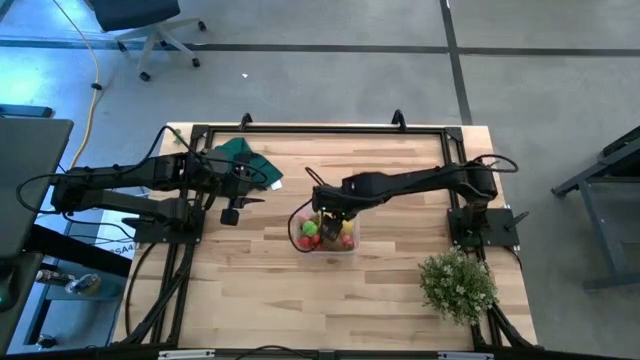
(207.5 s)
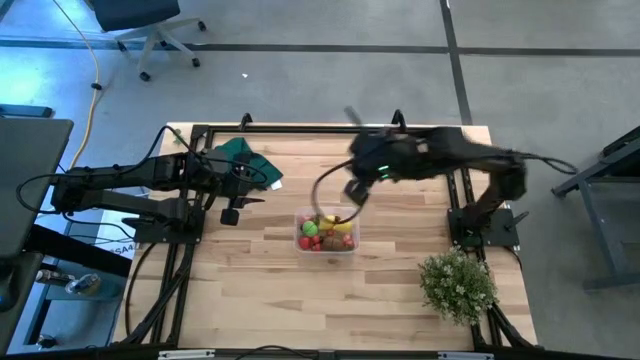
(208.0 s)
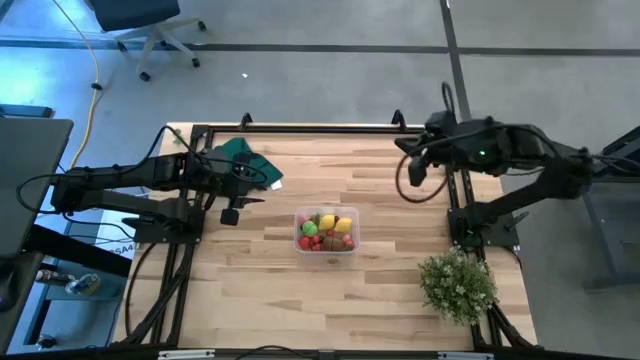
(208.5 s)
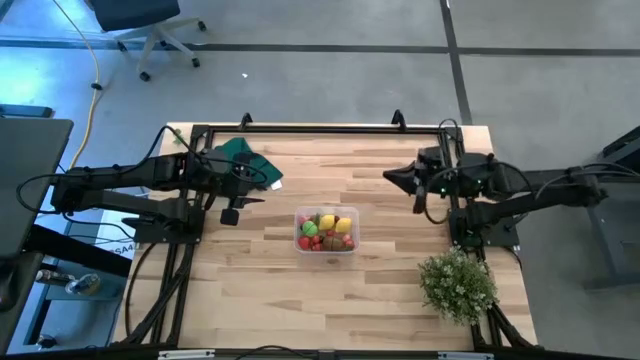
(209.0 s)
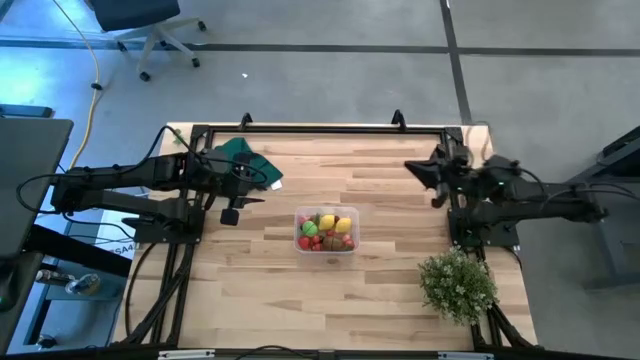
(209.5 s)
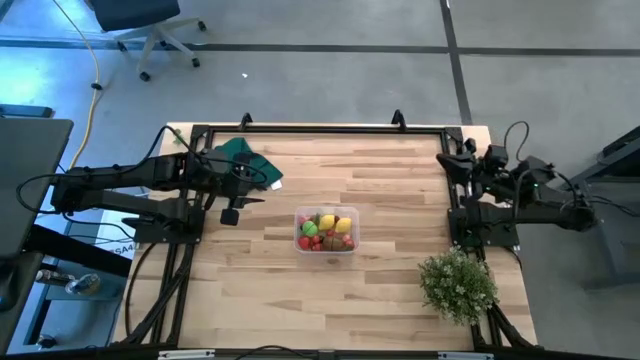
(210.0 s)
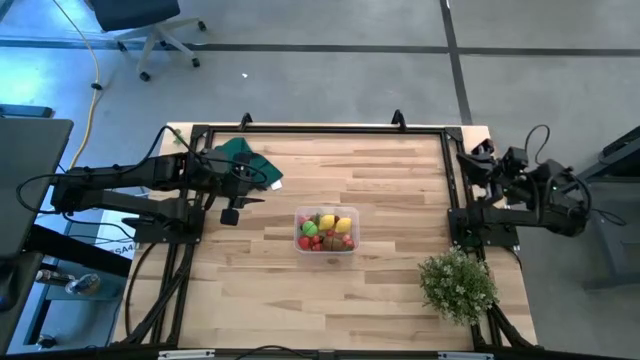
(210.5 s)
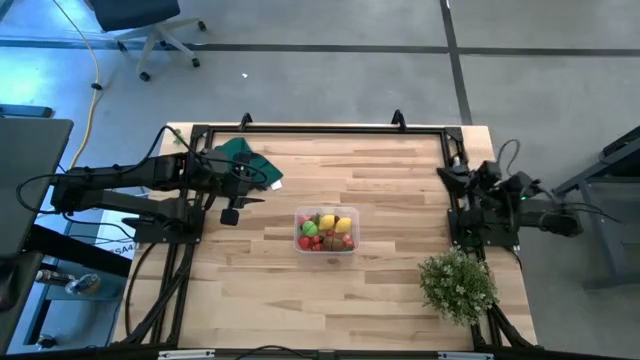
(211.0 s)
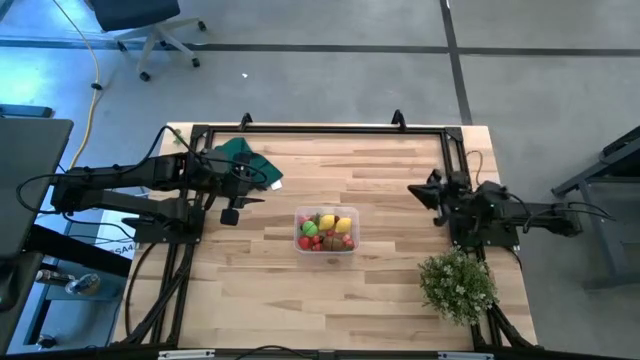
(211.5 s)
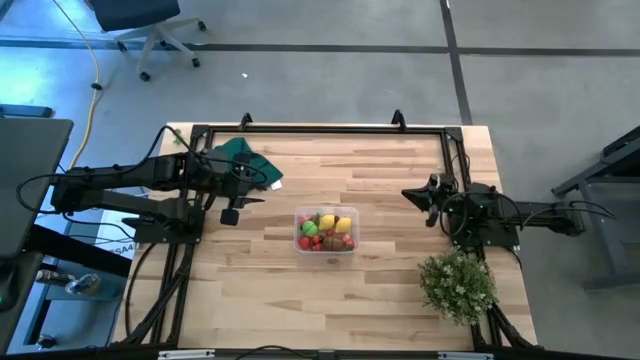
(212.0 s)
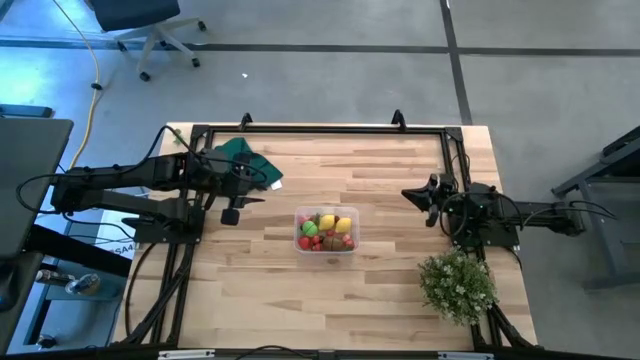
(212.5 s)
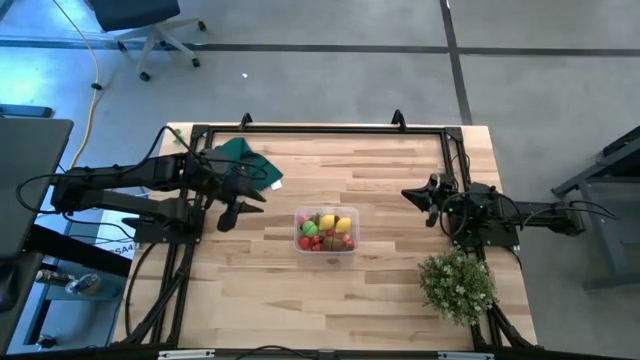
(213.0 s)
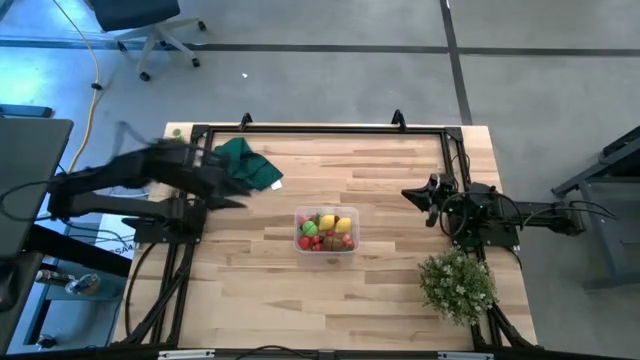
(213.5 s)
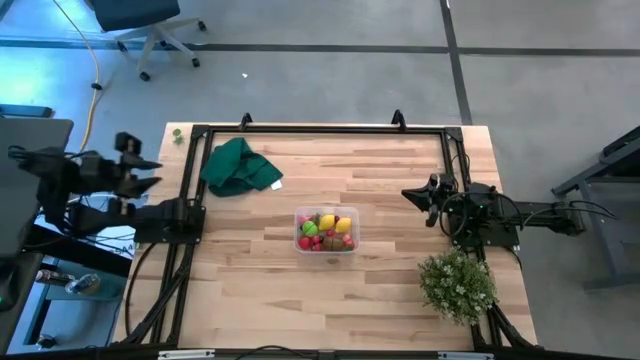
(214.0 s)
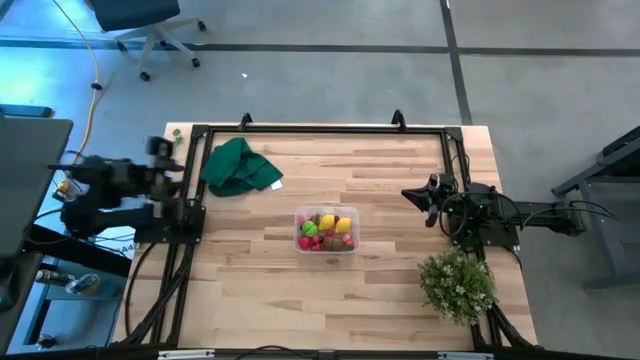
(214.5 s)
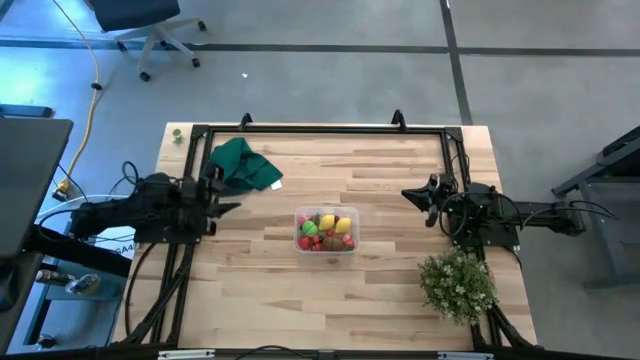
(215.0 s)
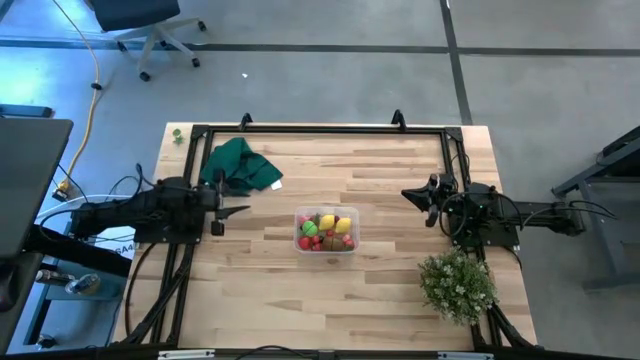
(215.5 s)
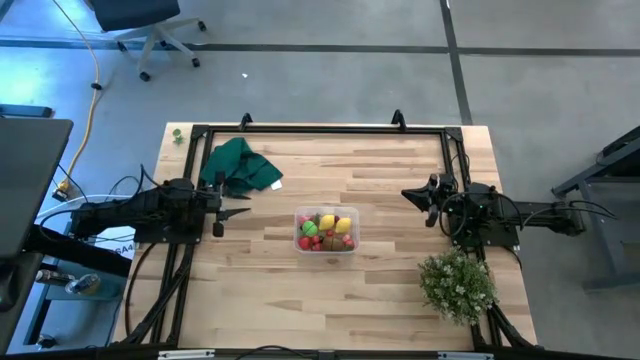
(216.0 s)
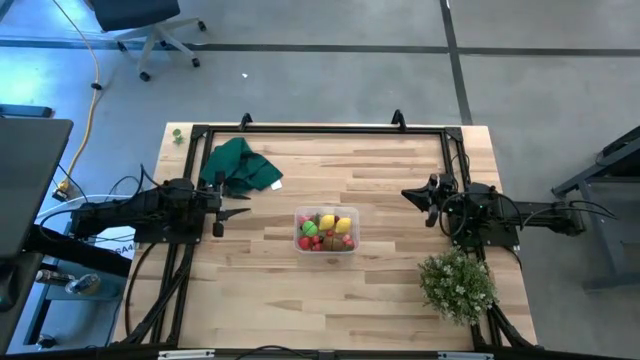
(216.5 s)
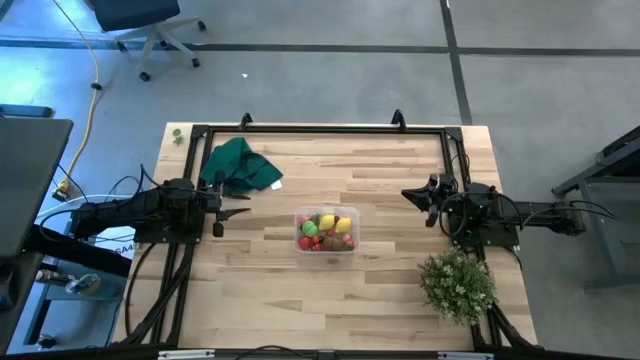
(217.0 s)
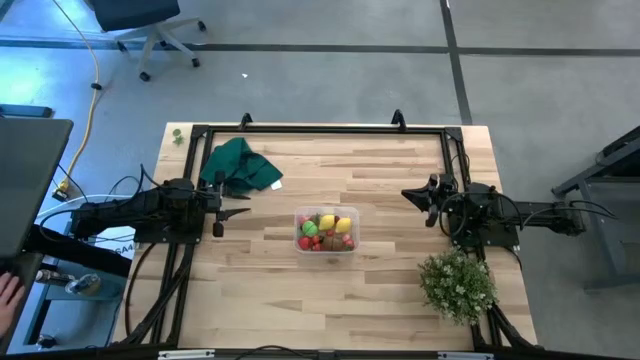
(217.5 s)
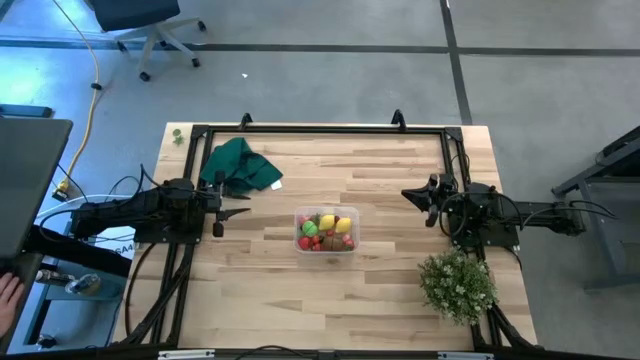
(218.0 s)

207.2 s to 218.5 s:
Task: Pick and placing Produce into tupperware
Return to Home Position

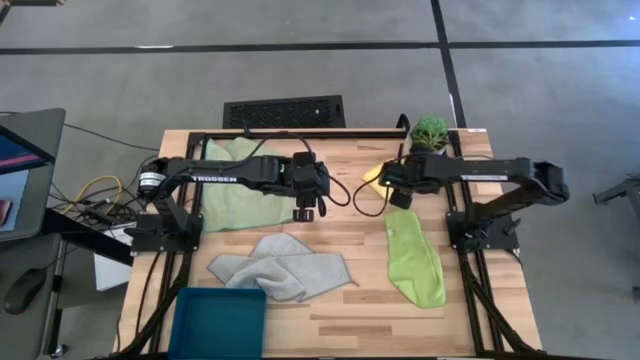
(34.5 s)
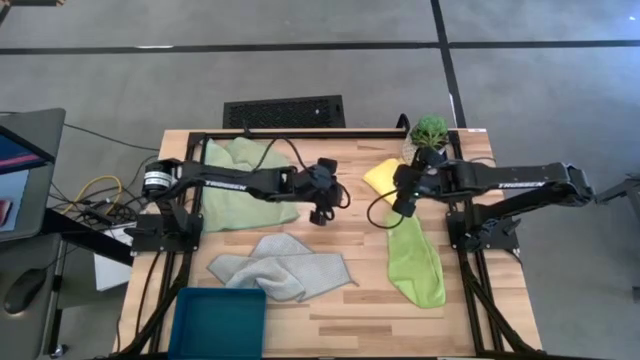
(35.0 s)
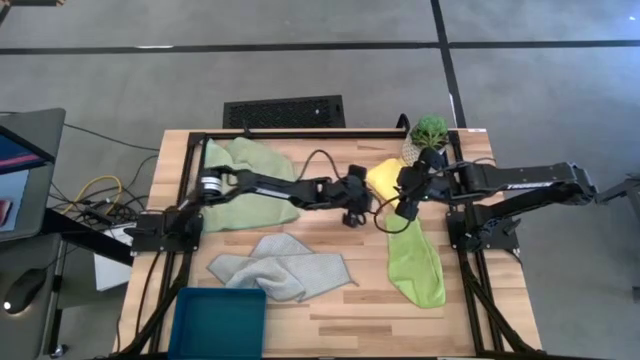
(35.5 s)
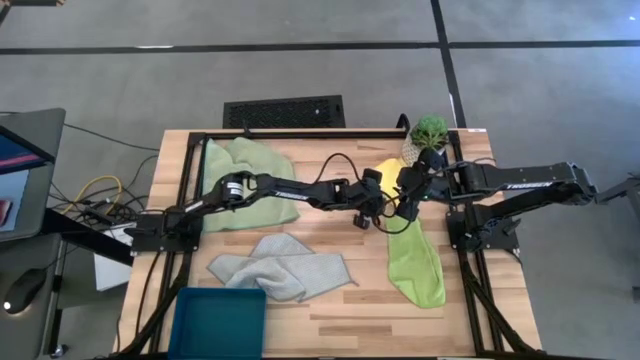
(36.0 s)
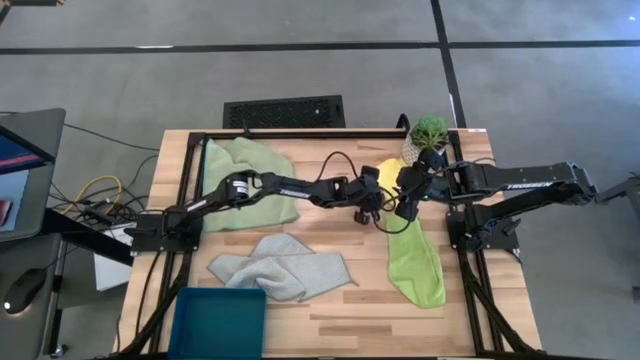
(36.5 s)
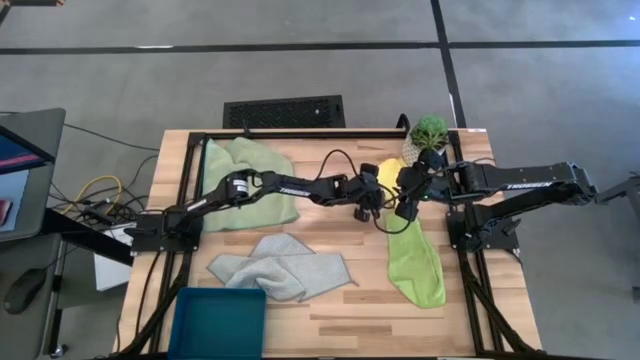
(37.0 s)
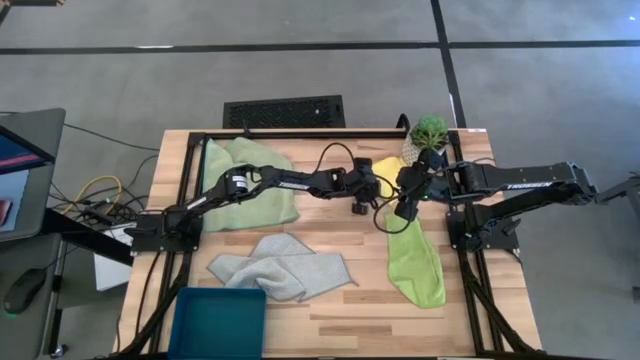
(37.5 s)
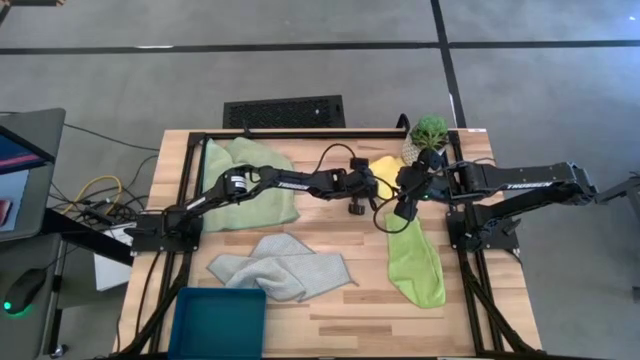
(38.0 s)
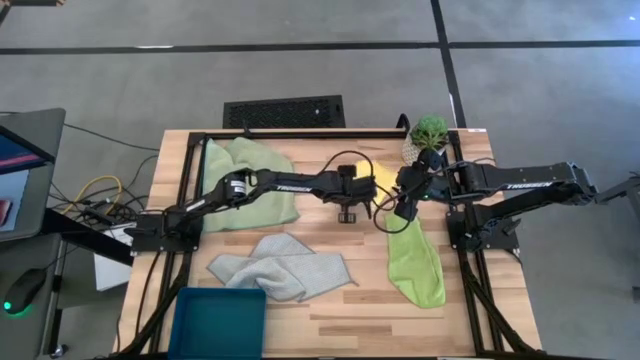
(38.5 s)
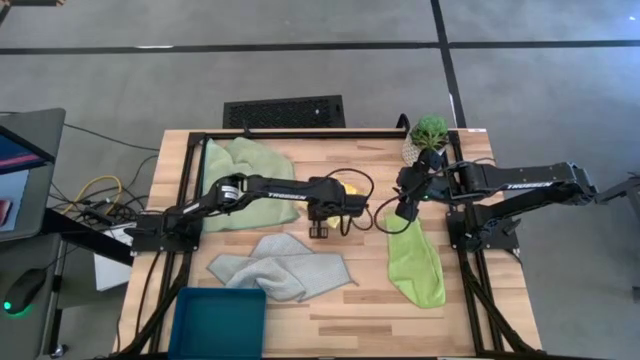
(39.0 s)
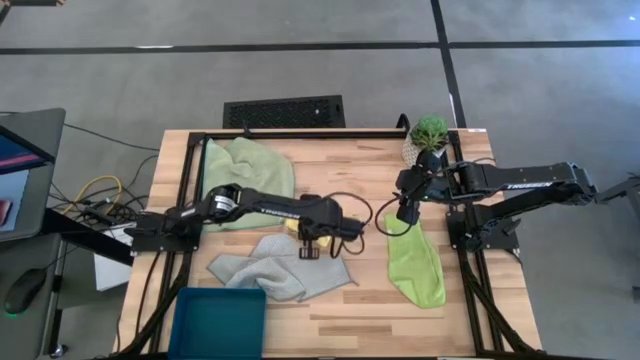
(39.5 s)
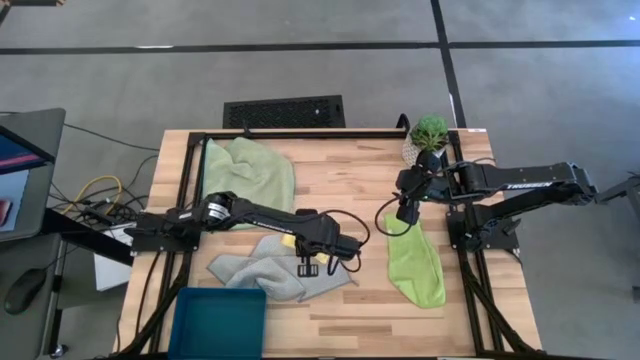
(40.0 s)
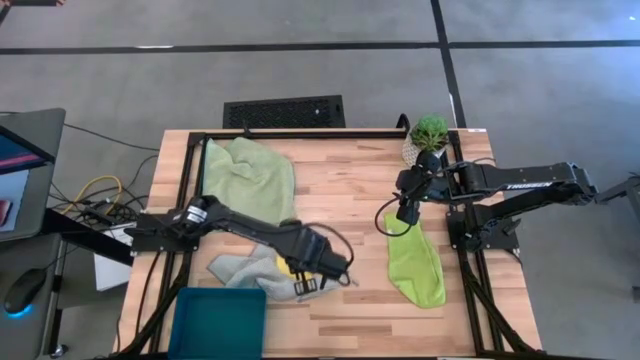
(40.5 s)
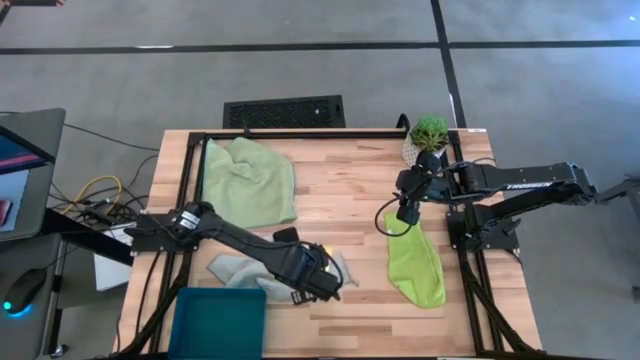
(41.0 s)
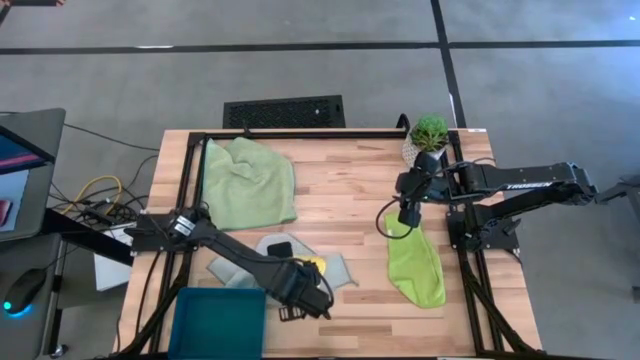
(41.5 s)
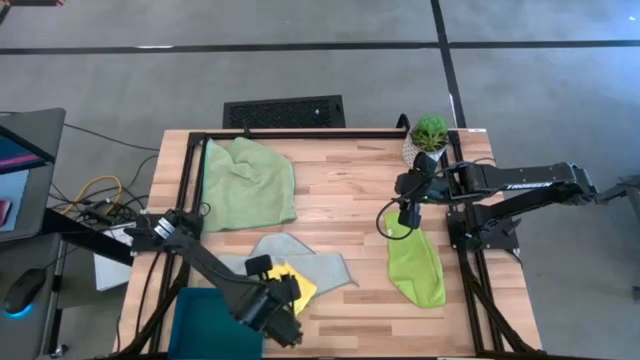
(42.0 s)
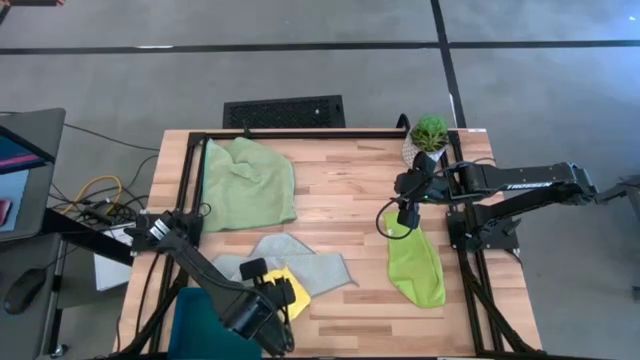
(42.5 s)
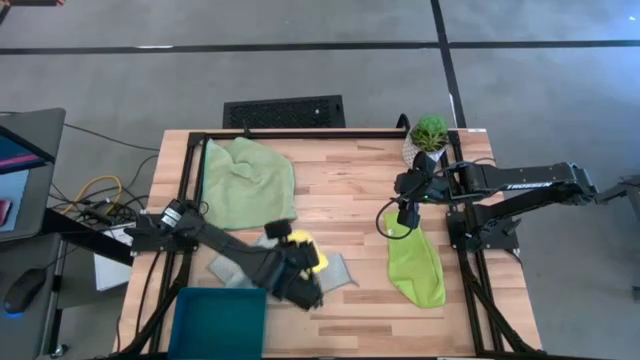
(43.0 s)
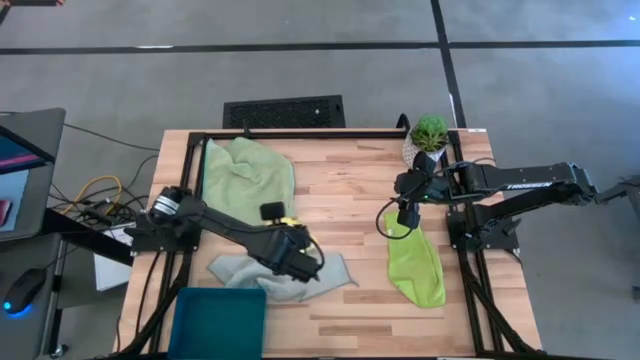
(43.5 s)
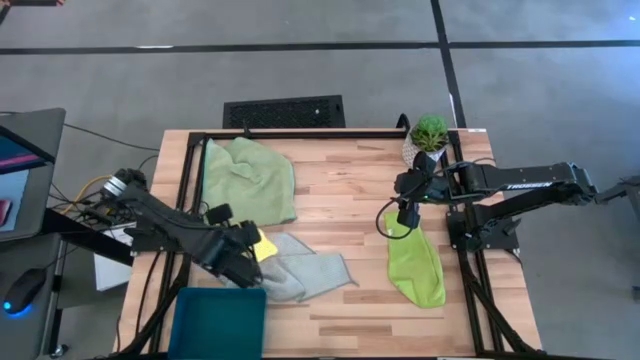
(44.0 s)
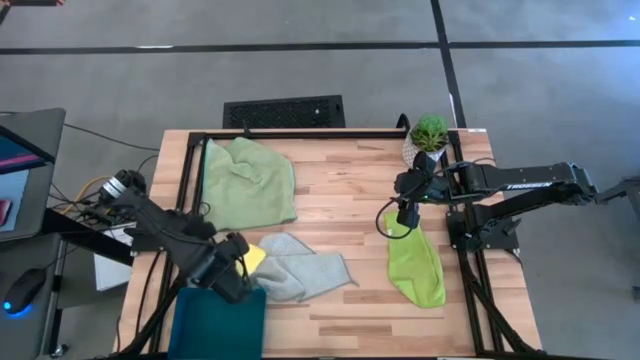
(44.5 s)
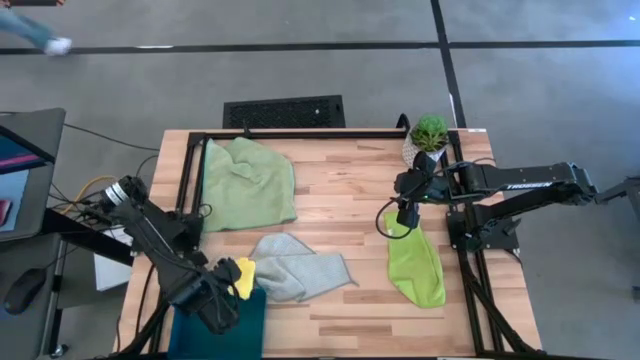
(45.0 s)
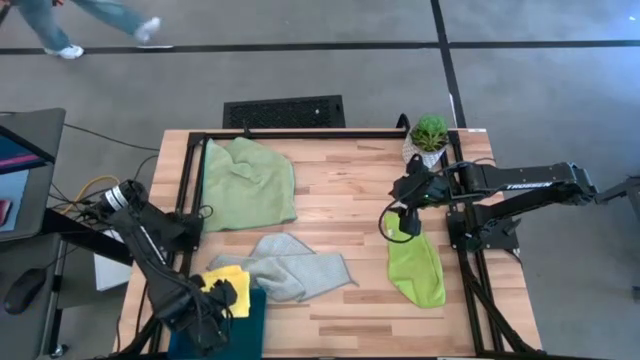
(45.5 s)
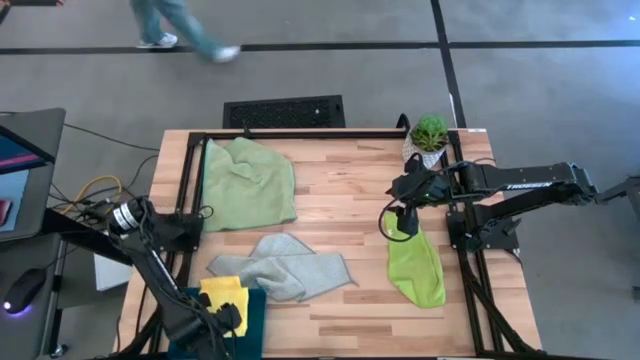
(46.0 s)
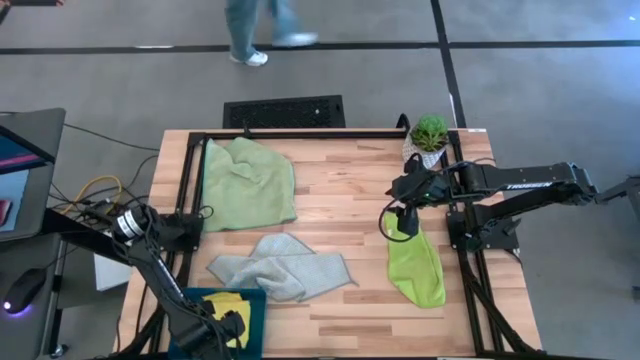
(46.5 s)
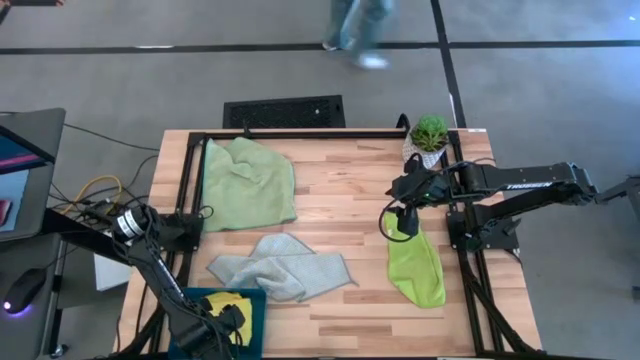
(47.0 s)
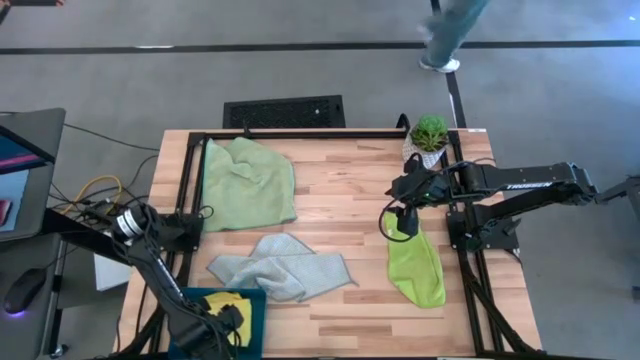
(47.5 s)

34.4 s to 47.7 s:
Task: Fold microfiber towels
Put the folded yellow microfiber cloth into the blue bin
